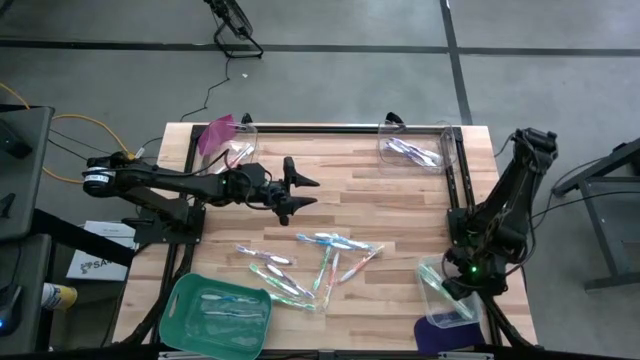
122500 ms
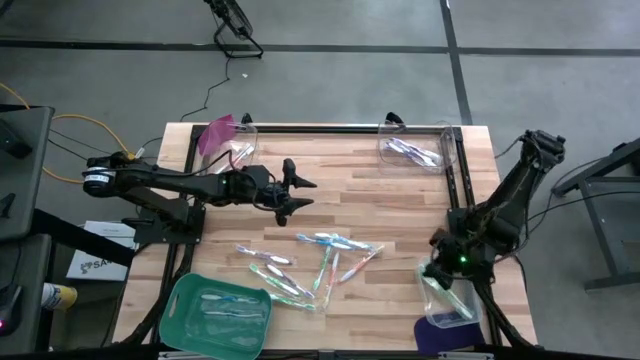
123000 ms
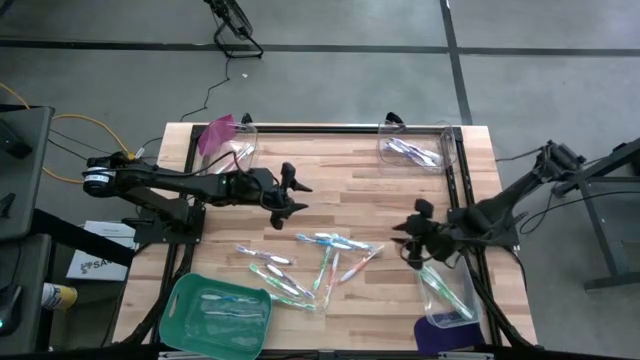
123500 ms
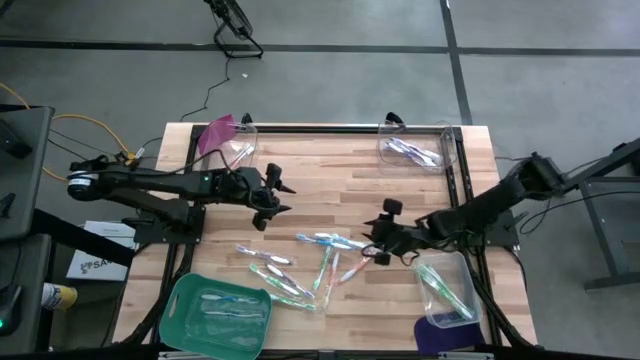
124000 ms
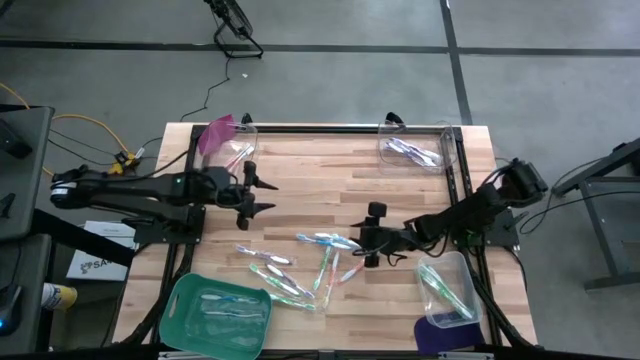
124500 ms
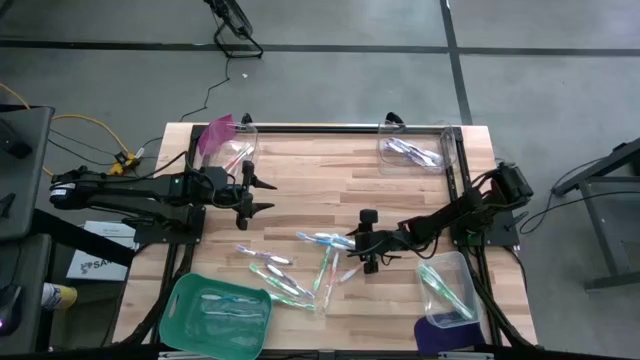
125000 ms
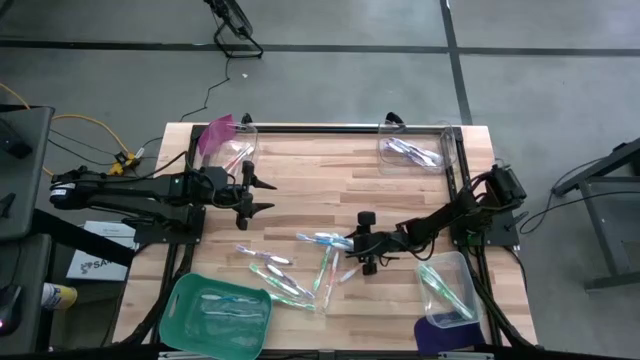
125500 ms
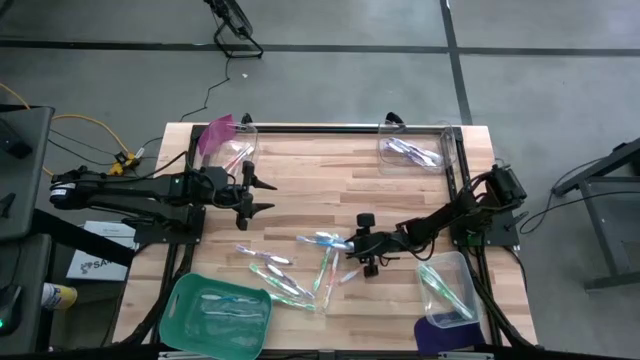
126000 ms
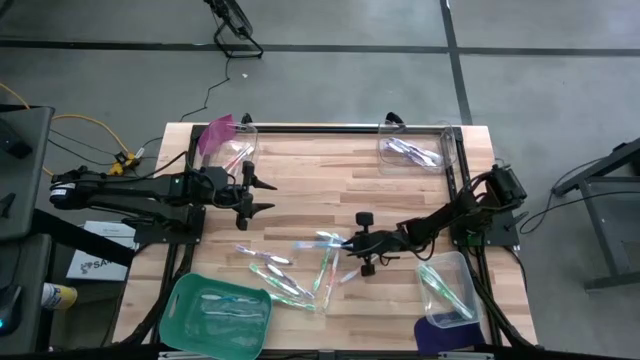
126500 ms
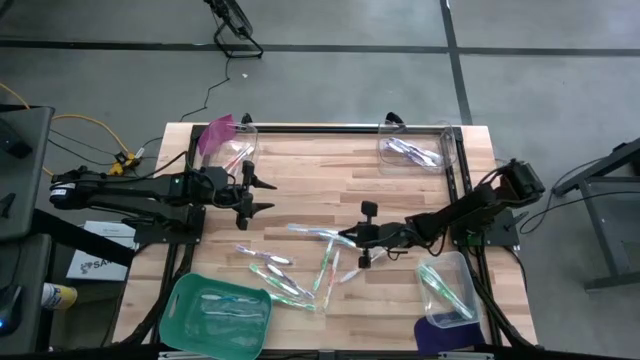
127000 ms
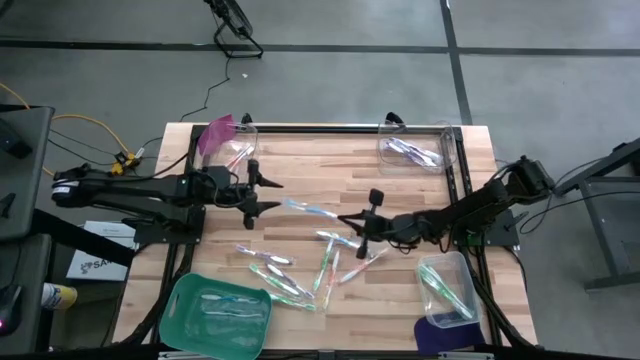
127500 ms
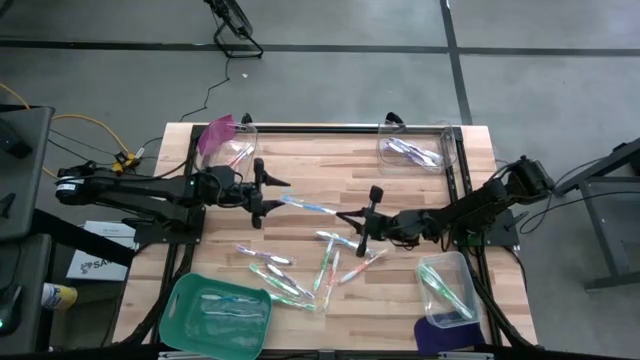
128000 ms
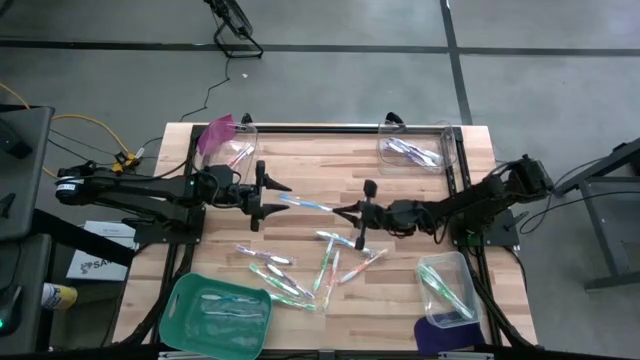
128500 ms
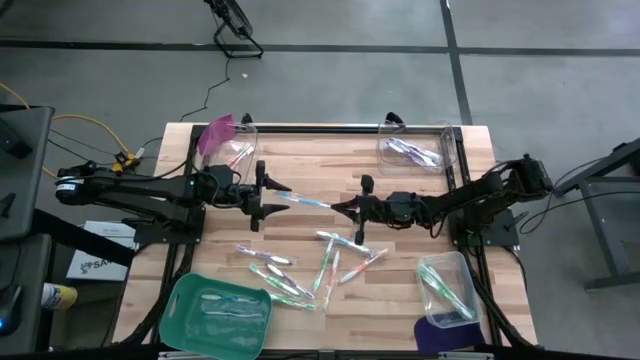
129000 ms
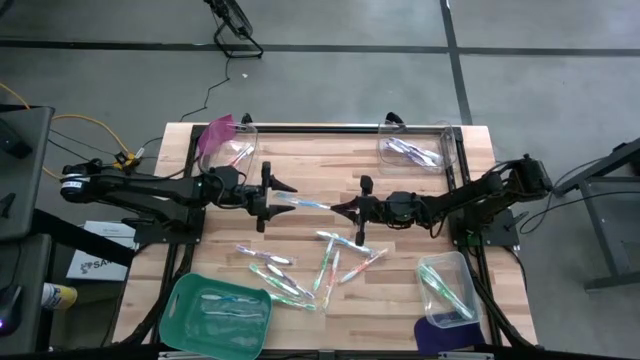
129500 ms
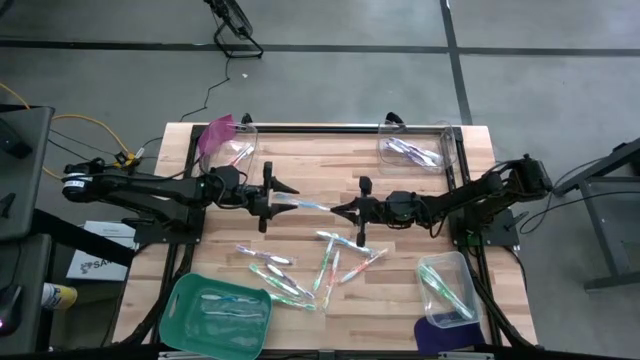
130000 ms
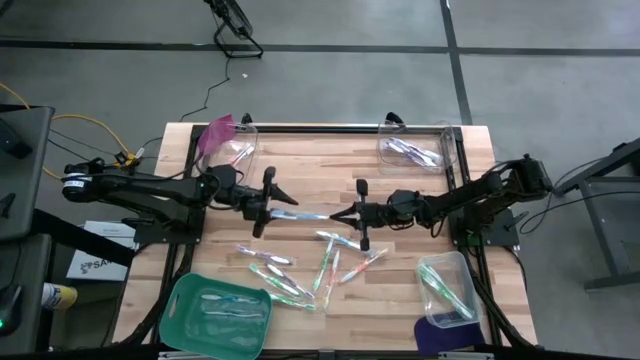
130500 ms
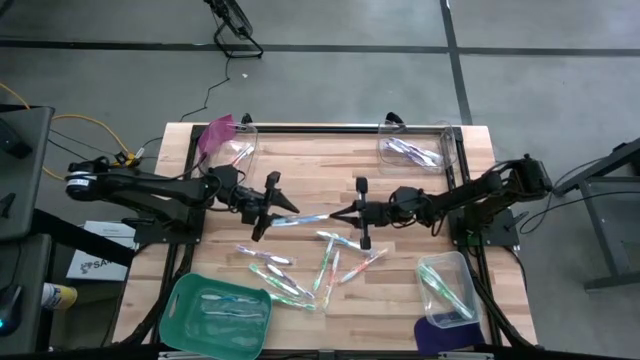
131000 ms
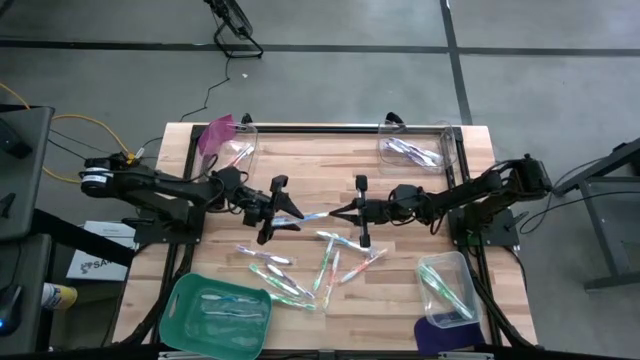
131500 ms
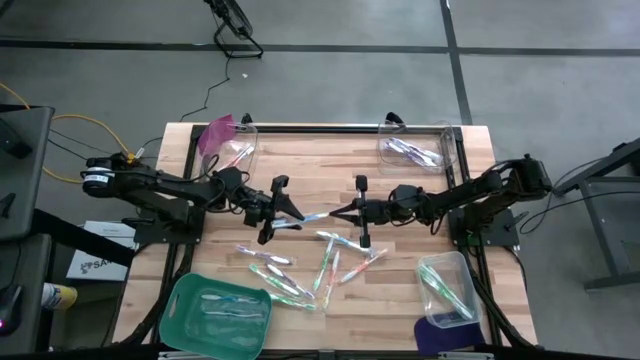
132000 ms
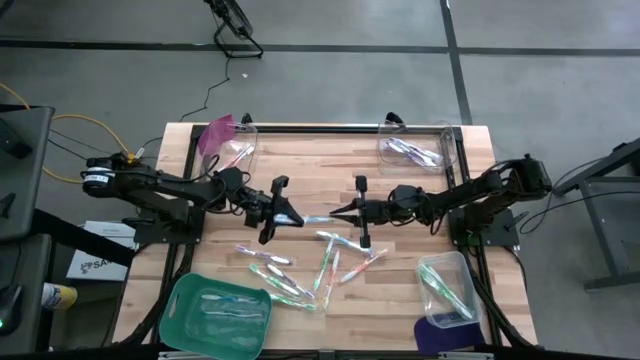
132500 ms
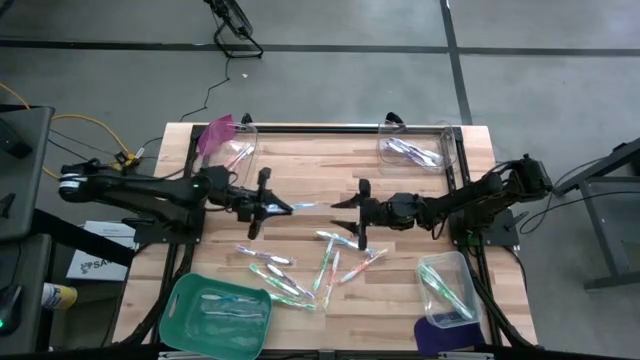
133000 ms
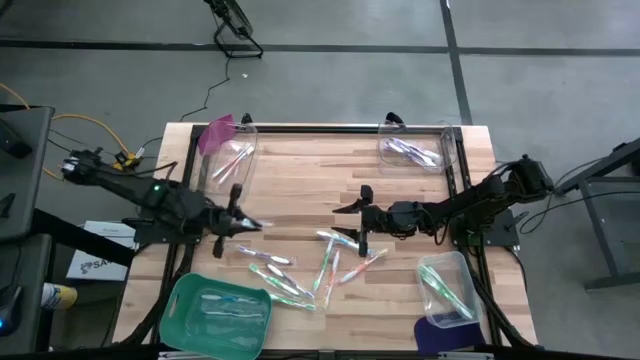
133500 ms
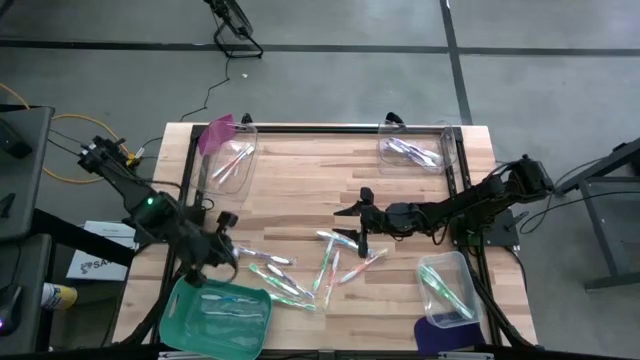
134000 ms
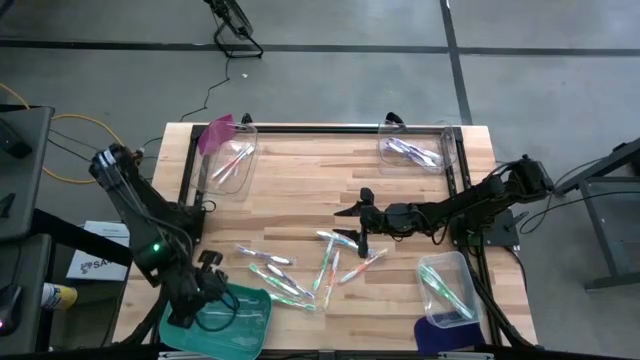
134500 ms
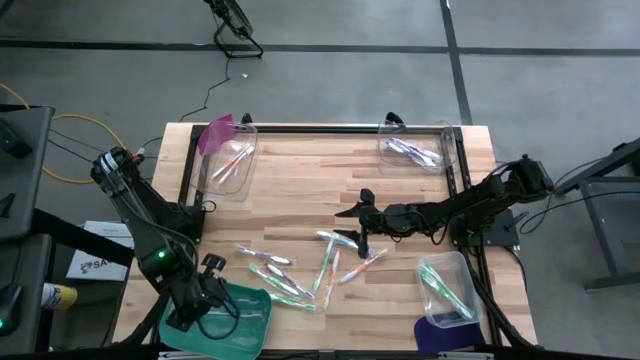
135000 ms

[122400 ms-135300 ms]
Task: Pick & Place Toothbrushes
Put the blue toothbrush into the green bin

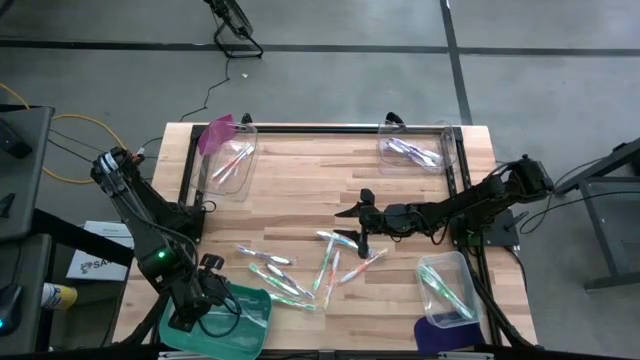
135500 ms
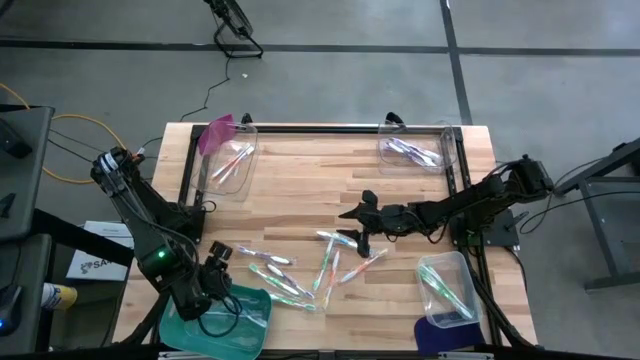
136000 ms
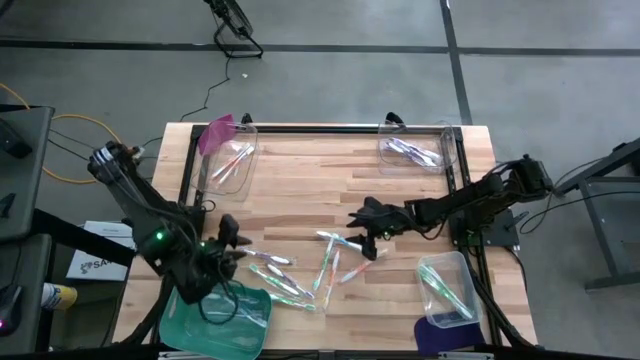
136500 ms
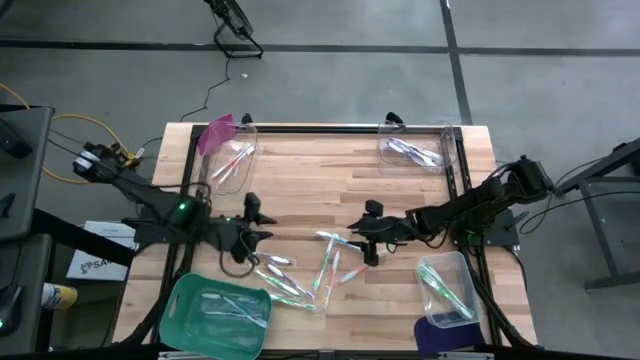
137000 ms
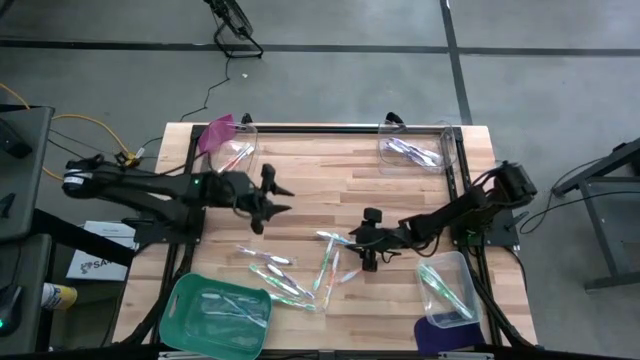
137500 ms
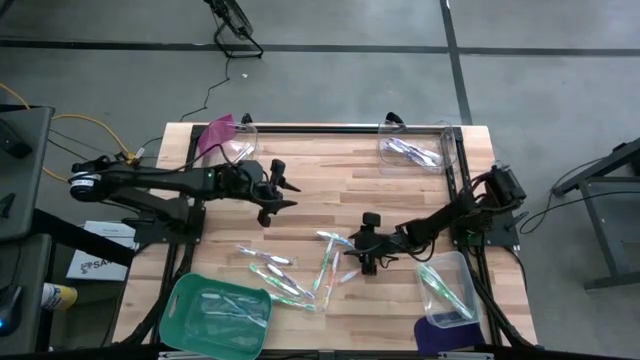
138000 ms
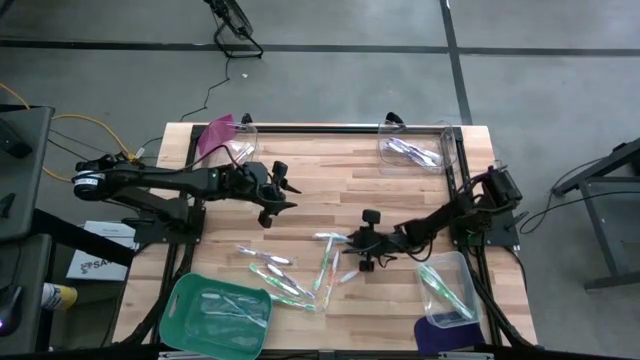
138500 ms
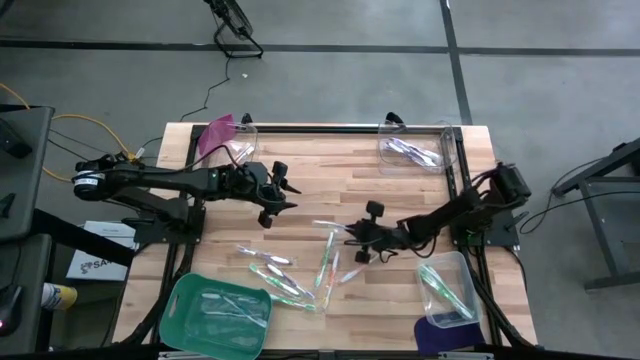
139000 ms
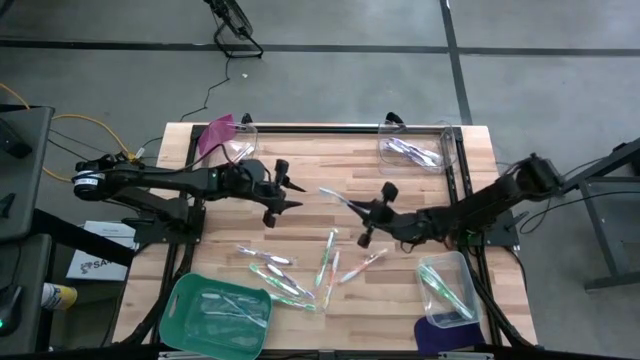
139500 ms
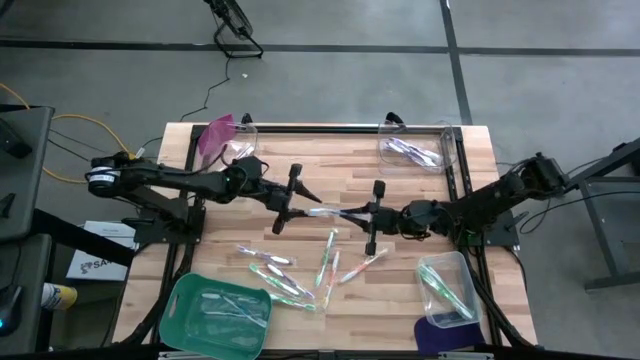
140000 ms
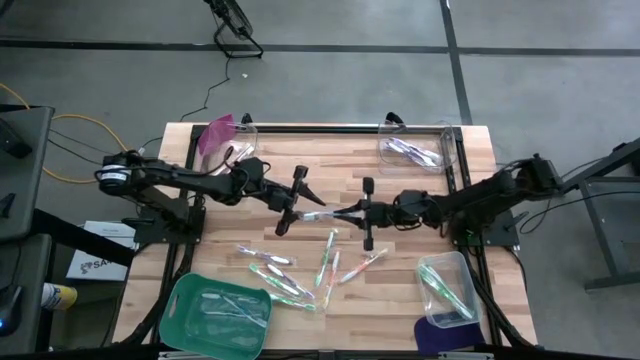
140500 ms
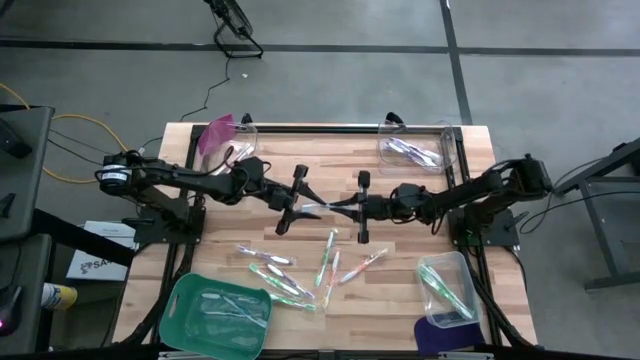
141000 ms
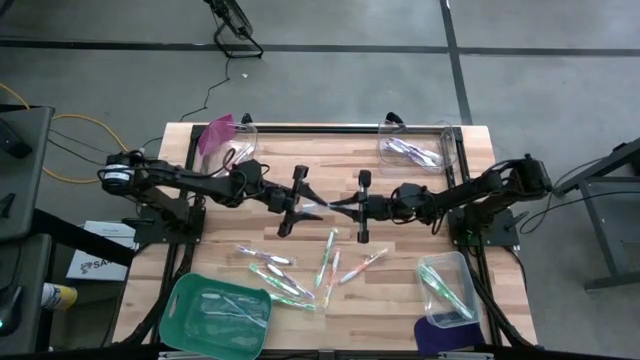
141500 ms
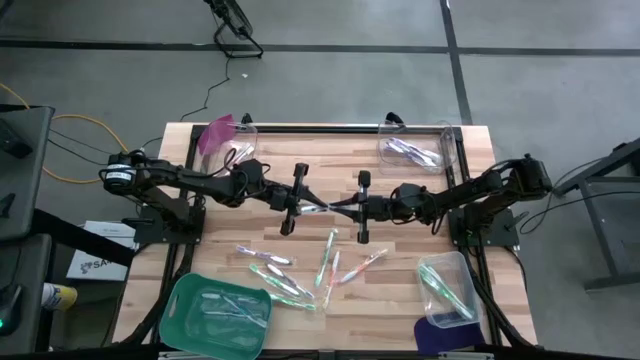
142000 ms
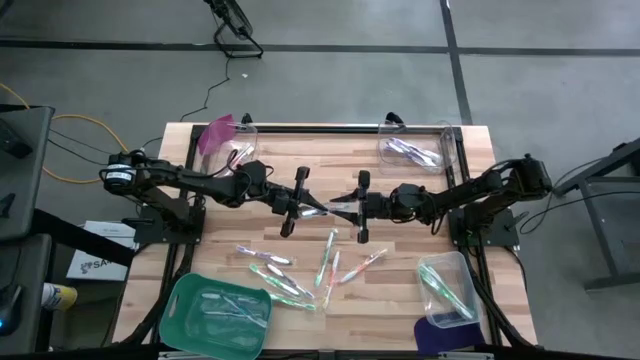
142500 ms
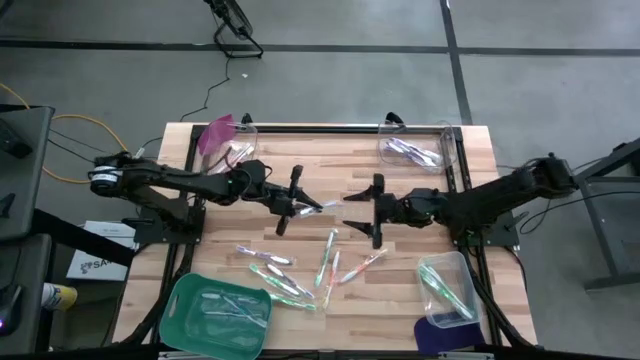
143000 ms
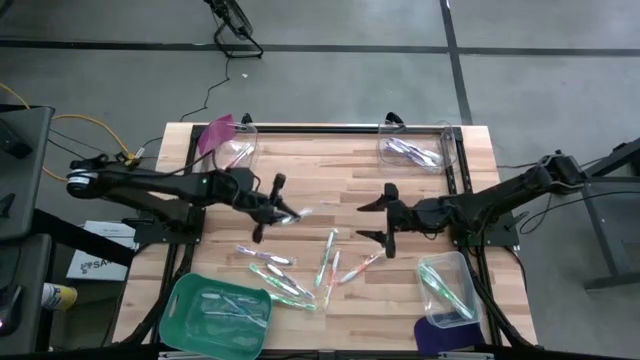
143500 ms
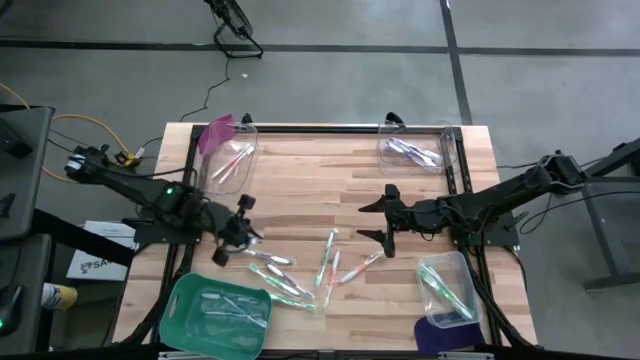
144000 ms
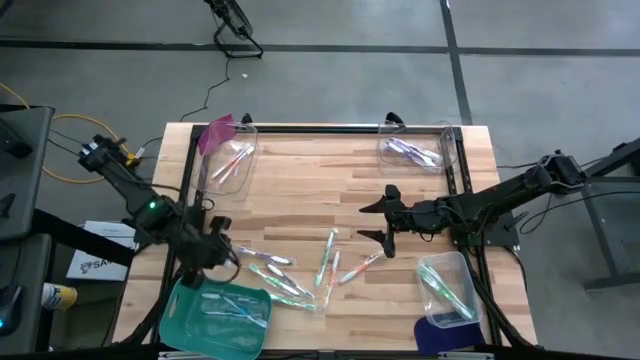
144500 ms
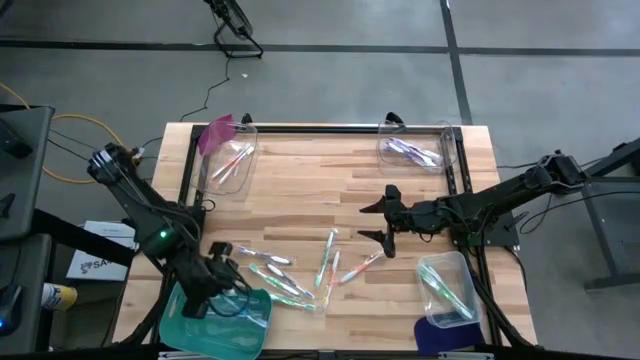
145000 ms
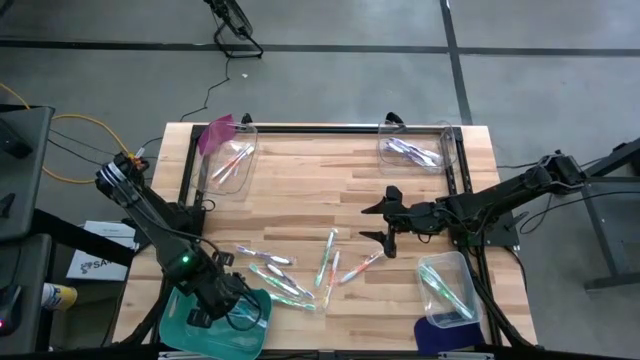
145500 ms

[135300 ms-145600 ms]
Put the blue toothbrush into the green bin
